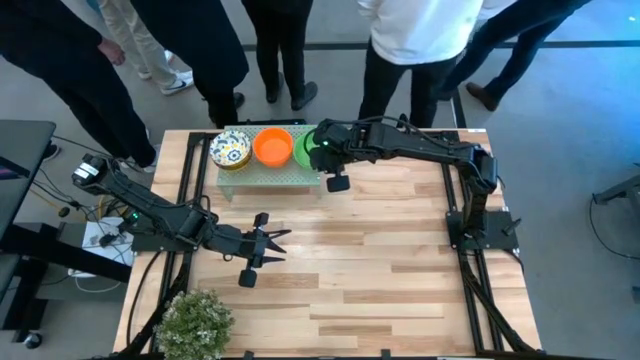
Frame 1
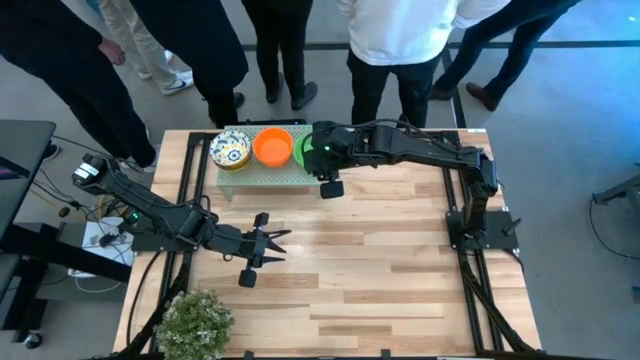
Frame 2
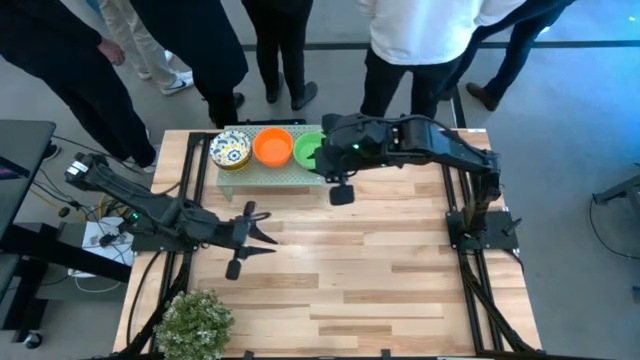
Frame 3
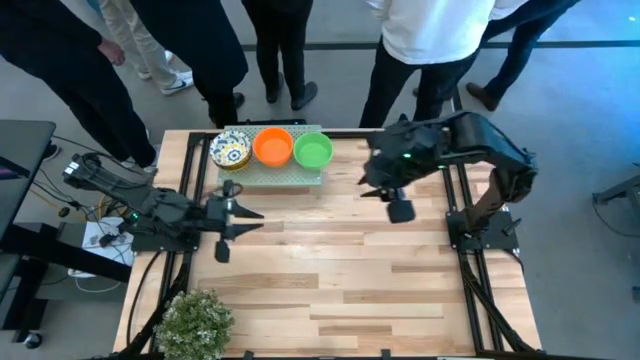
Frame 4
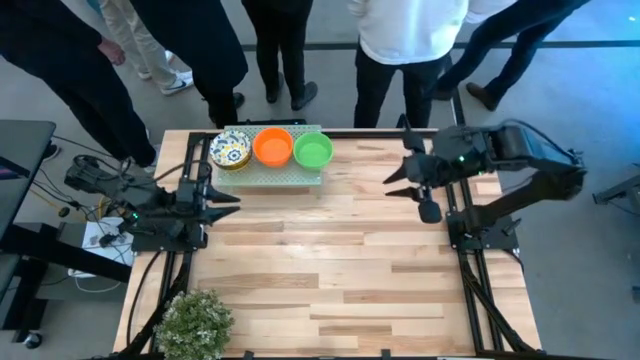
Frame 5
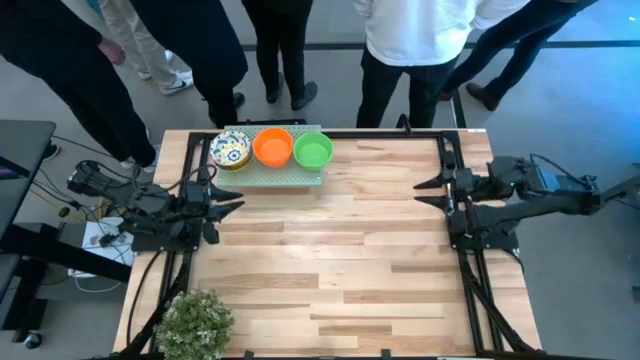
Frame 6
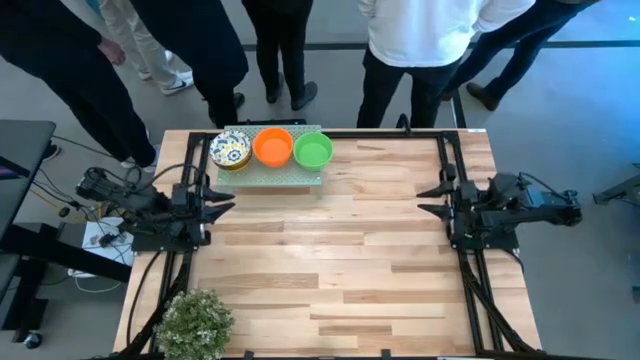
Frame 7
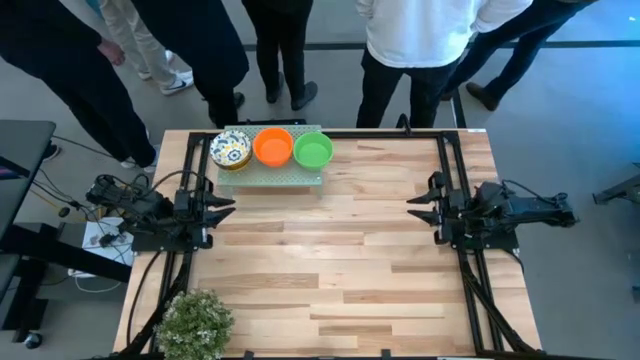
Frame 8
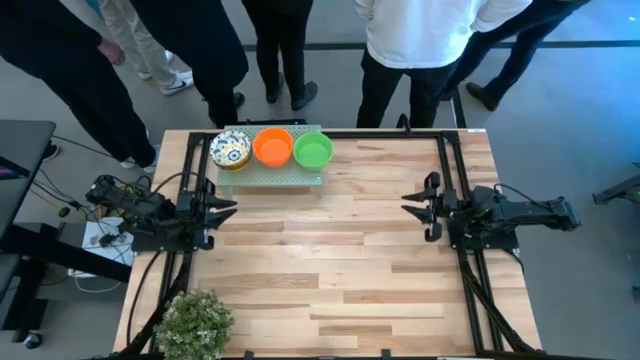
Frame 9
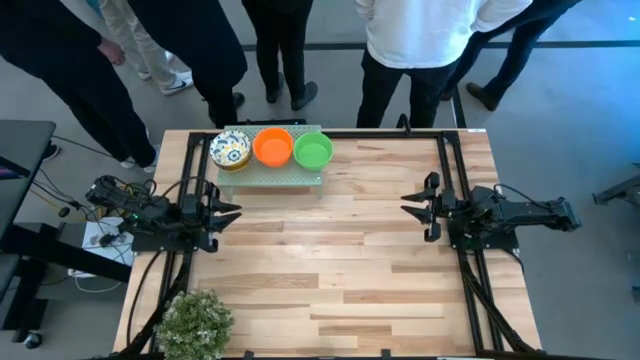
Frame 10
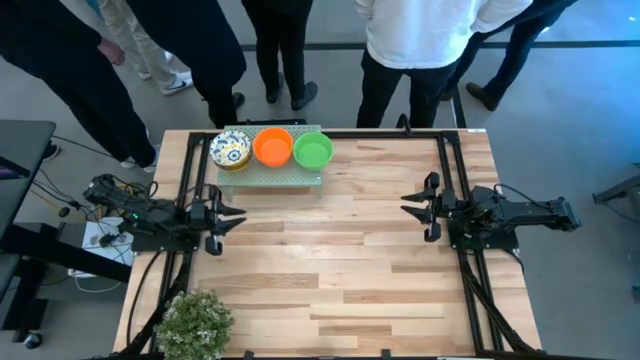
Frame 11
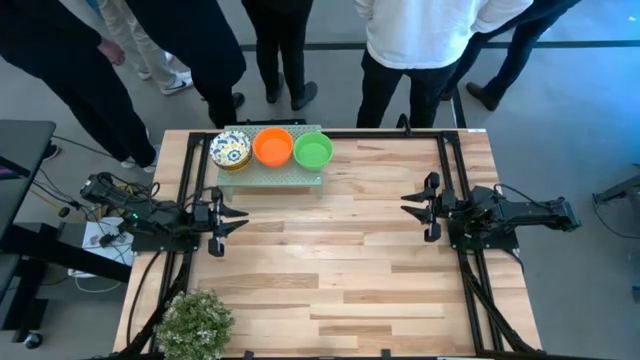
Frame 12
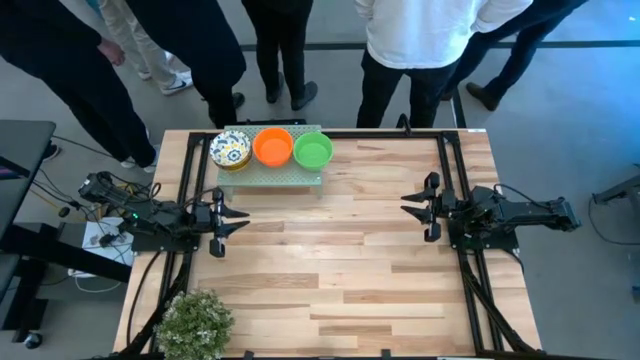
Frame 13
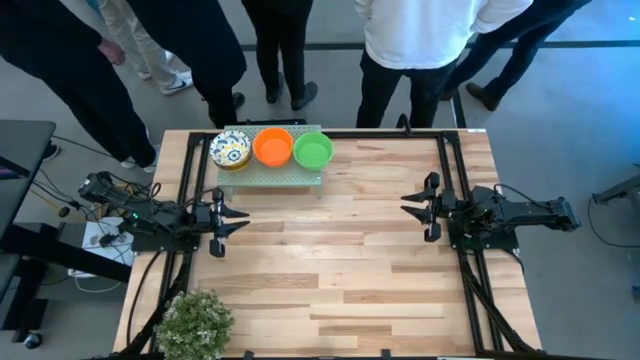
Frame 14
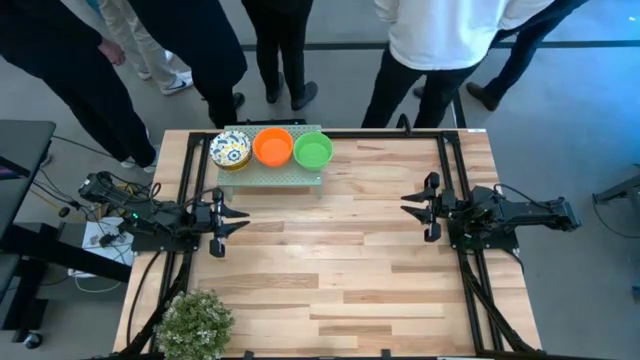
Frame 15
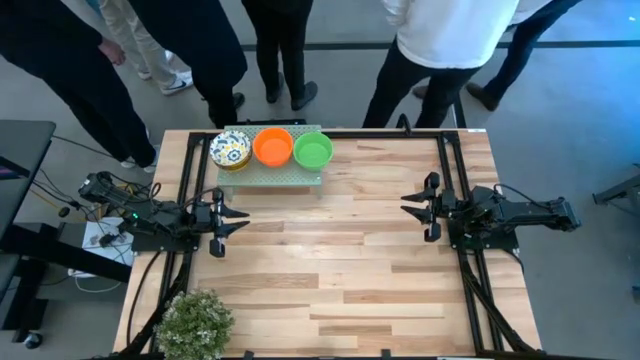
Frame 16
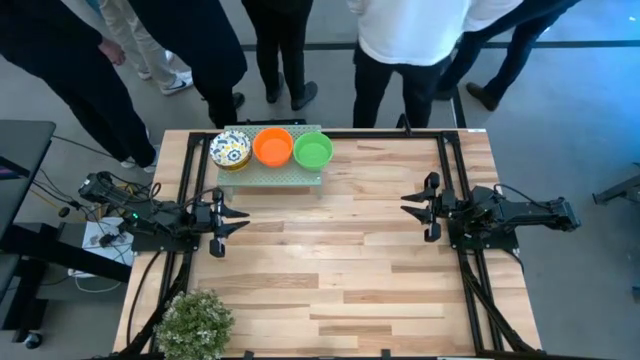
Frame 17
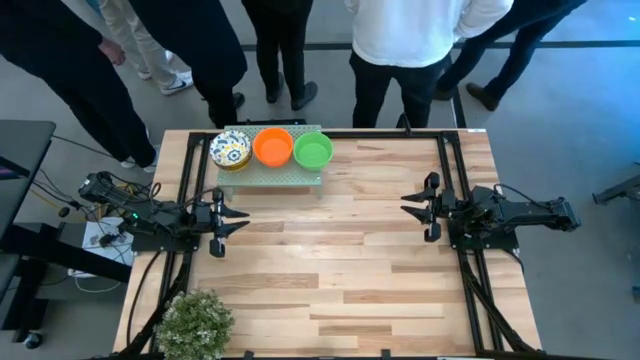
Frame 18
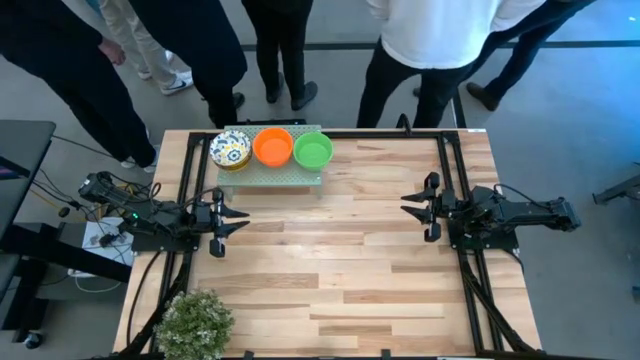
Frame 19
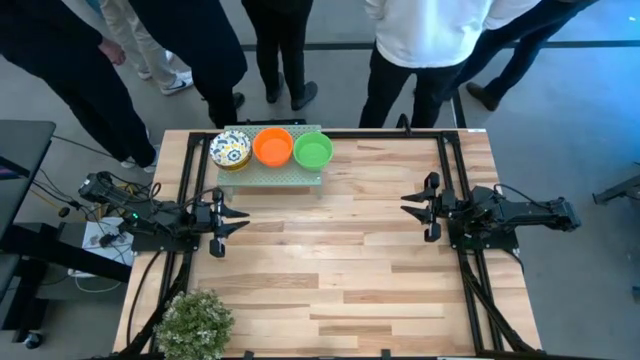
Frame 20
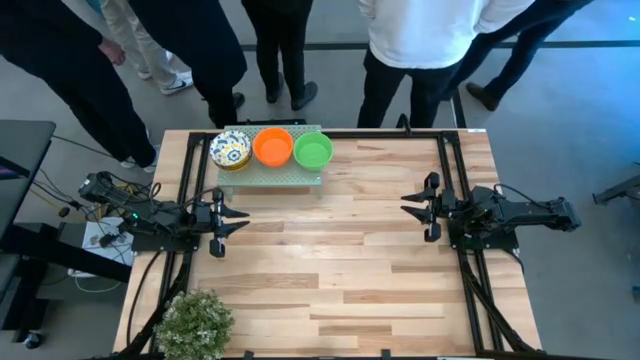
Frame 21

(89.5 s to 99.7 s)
Task: Pick & Place Mini bowls
Return to Home Position

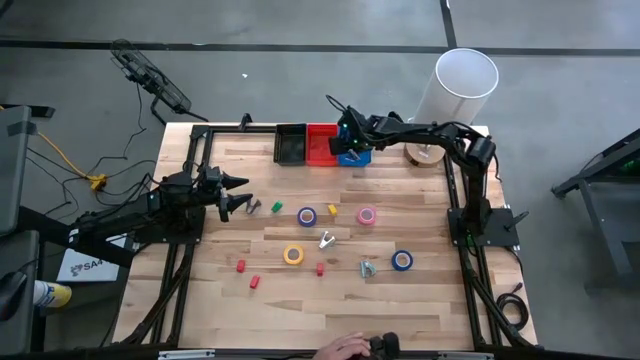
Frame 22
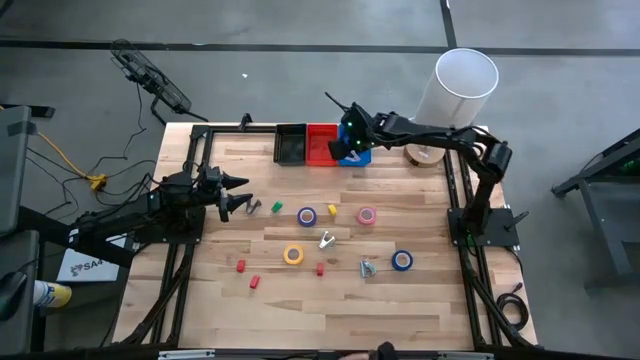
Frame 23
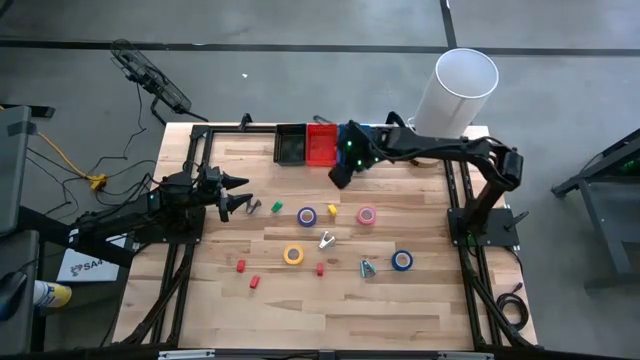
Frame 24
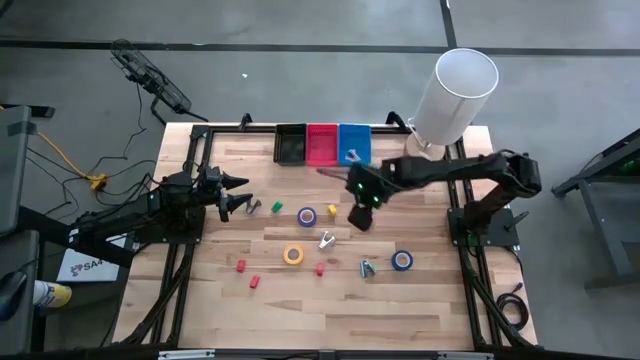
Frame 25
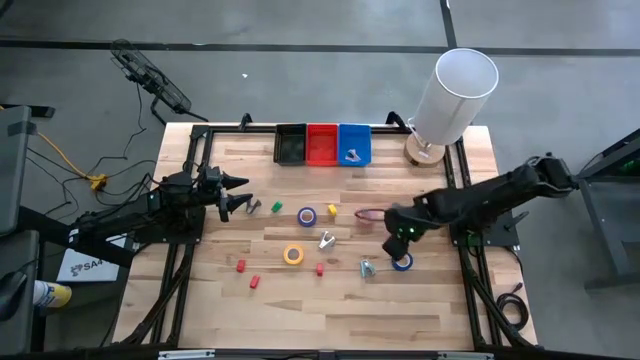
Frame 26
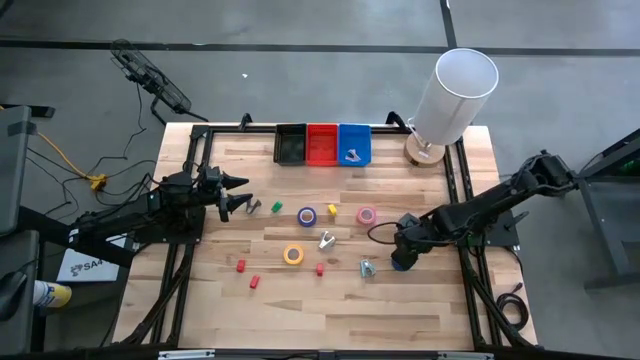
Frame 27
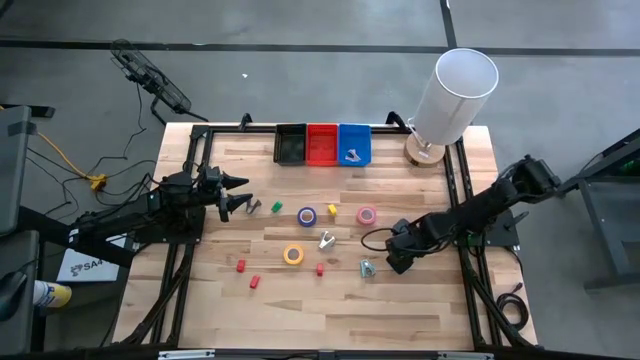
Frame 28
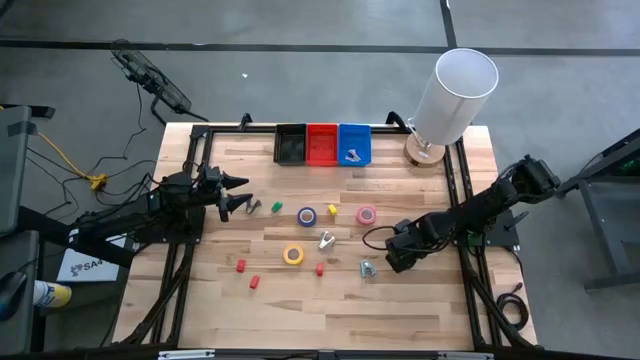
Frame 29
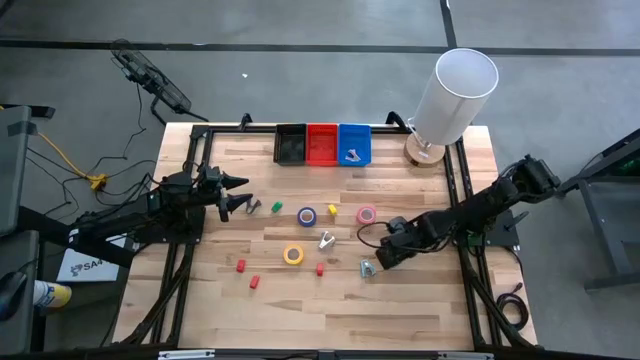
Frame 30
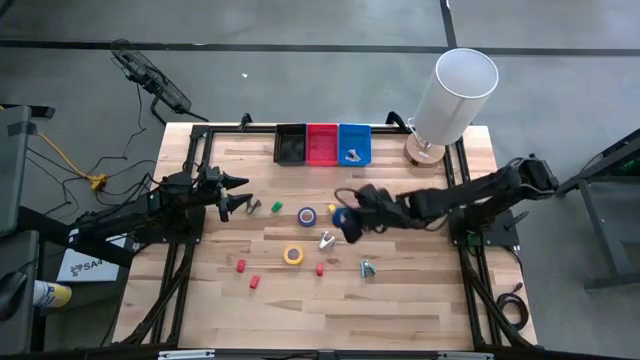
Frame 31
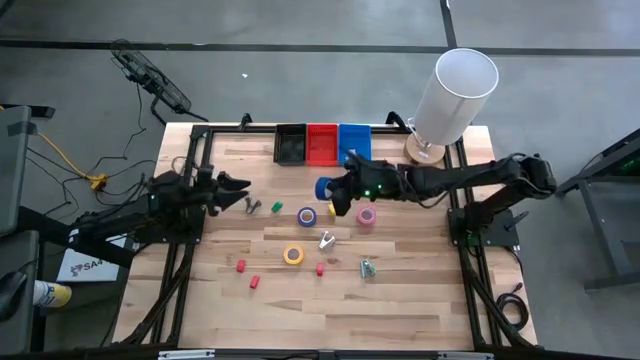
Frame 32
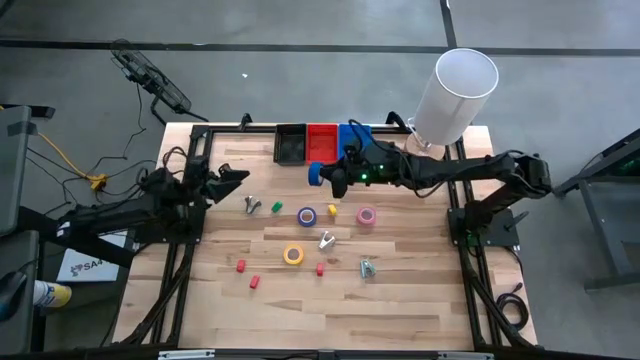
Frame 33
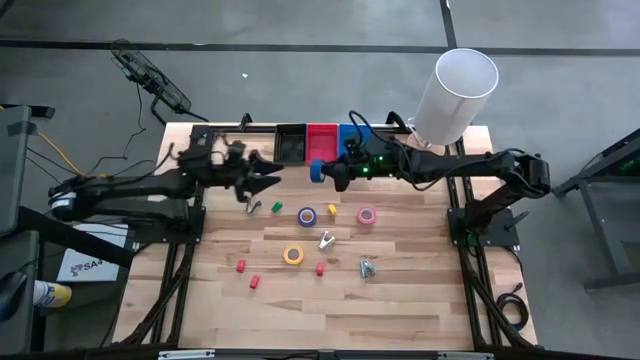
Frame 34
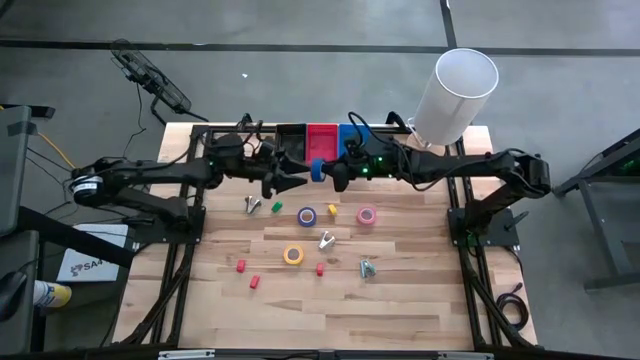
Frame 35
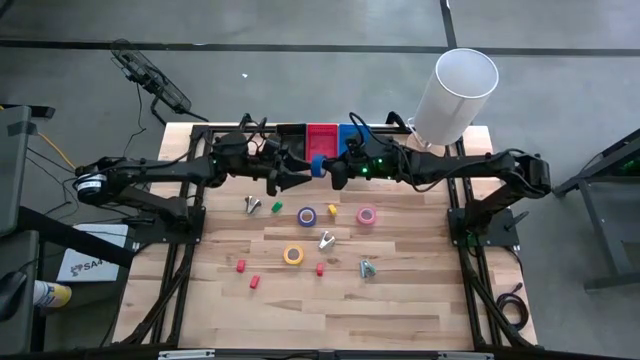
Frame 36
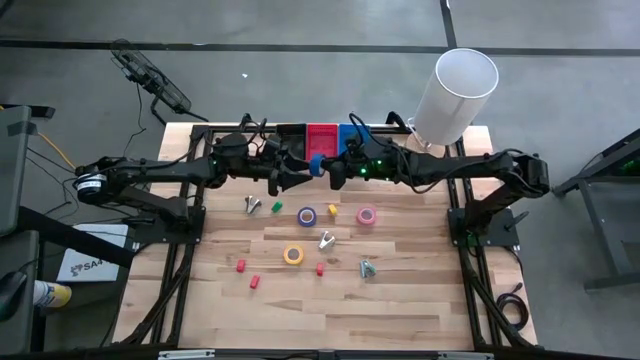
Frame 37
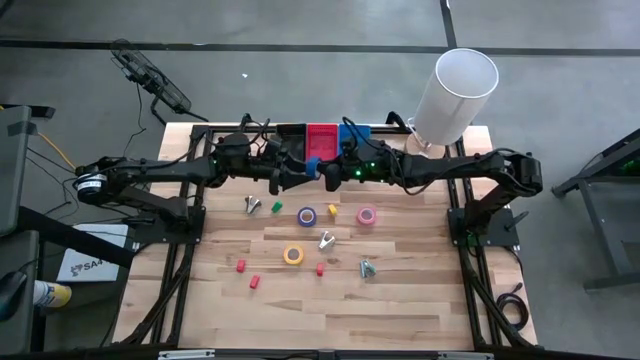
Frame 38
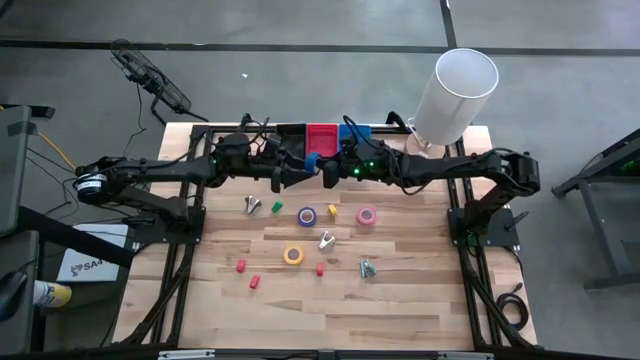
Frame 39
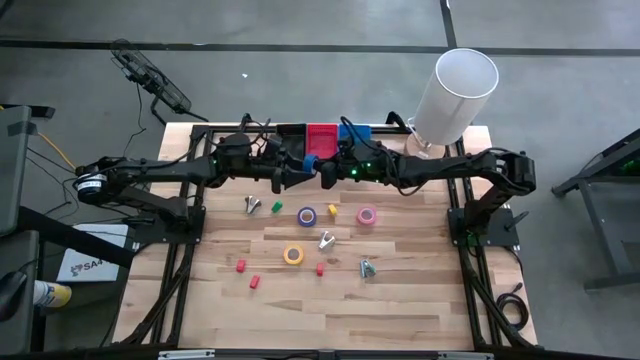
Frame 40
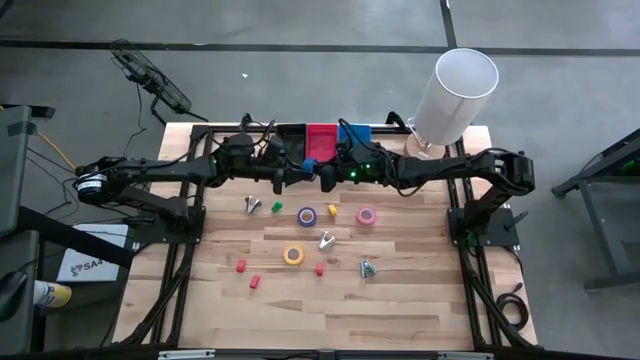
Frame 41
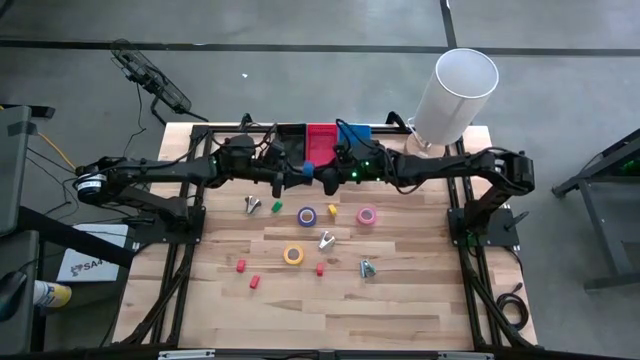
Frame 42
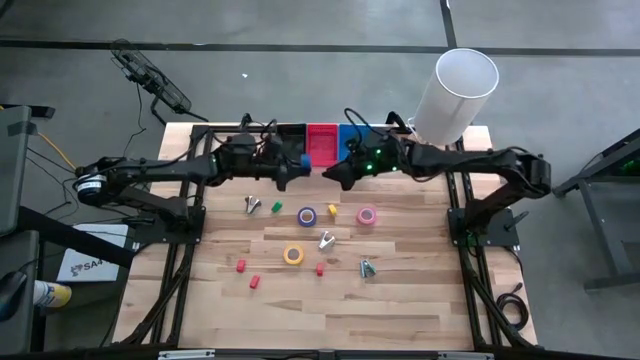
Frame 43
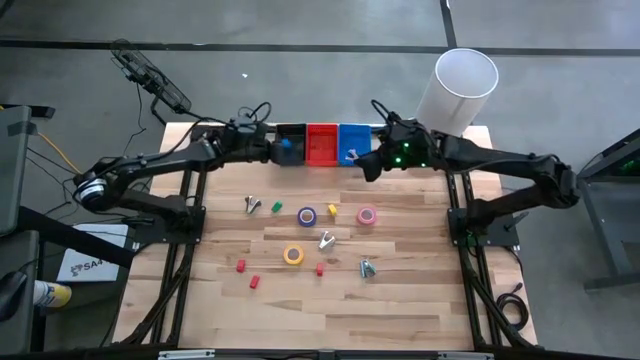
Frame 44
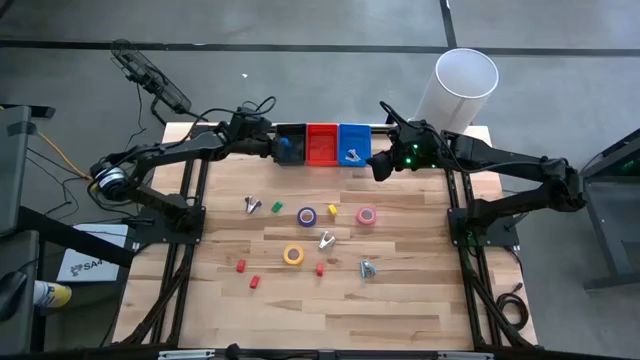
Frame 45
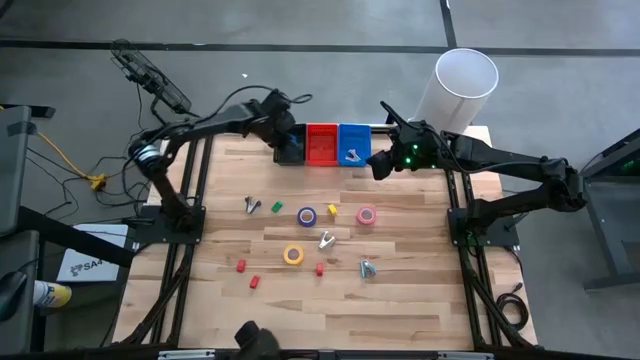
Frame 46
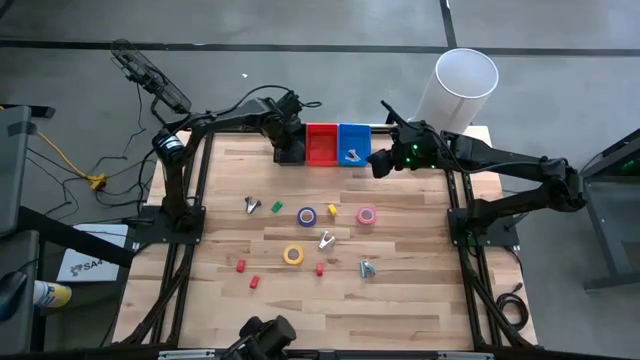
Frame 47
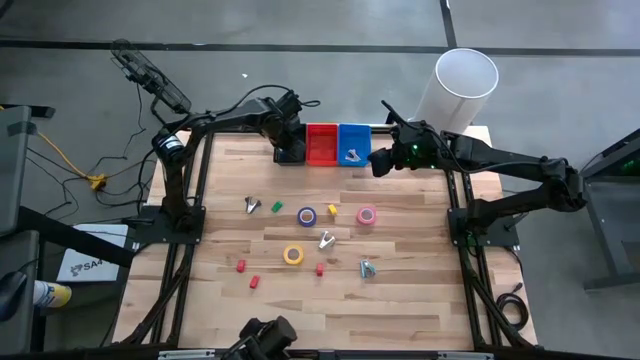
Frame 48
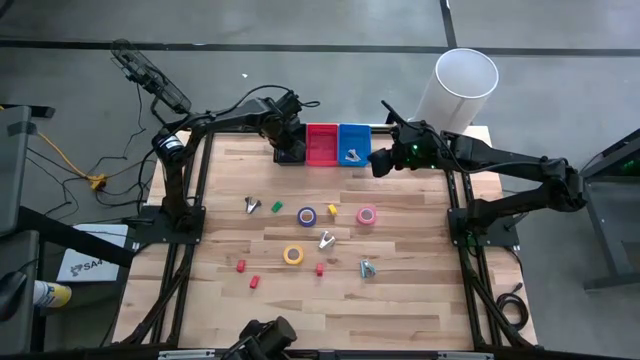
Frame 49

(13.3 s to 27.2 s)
Task: Pick and place Stapler, Stapler remover, tape
Put the right blue tape into the black bin
